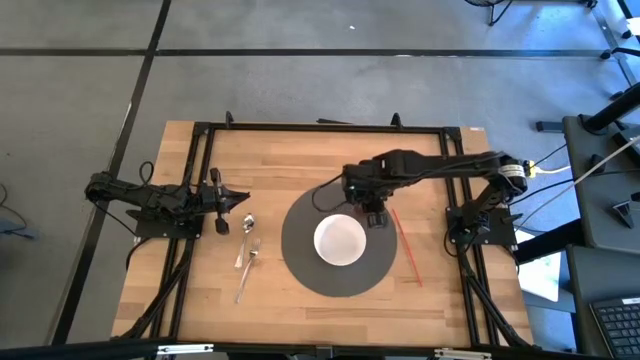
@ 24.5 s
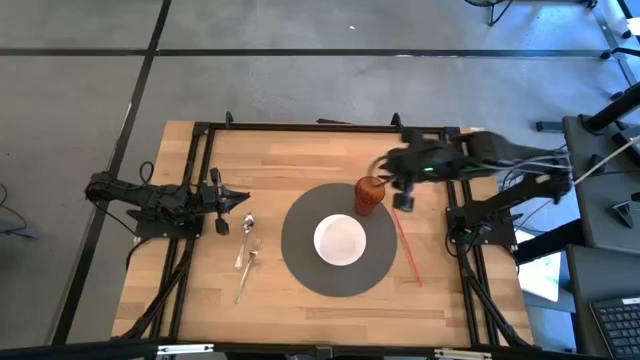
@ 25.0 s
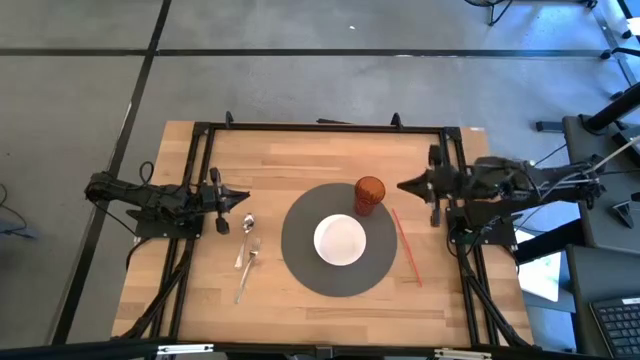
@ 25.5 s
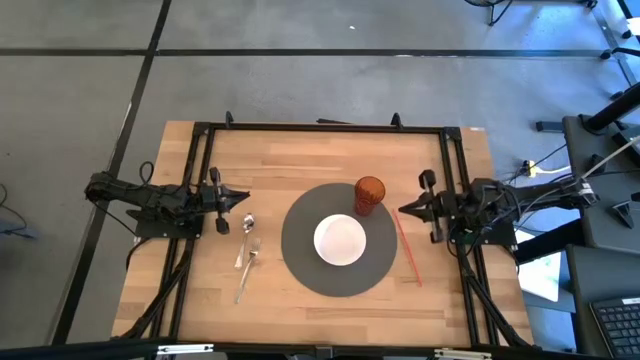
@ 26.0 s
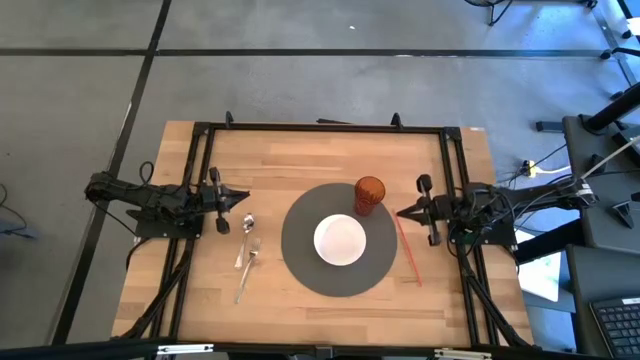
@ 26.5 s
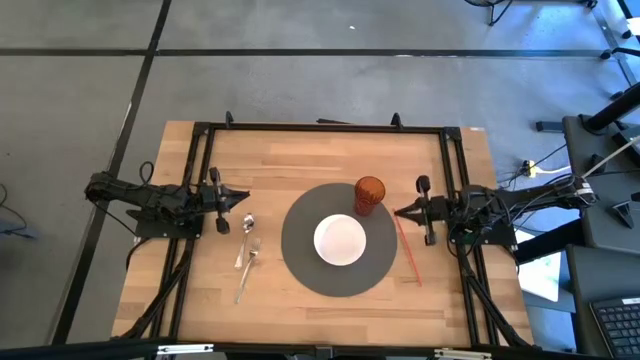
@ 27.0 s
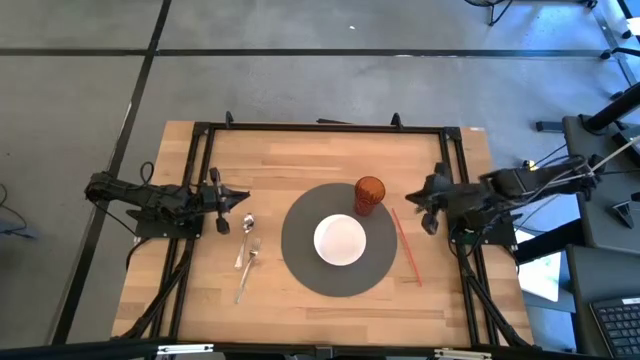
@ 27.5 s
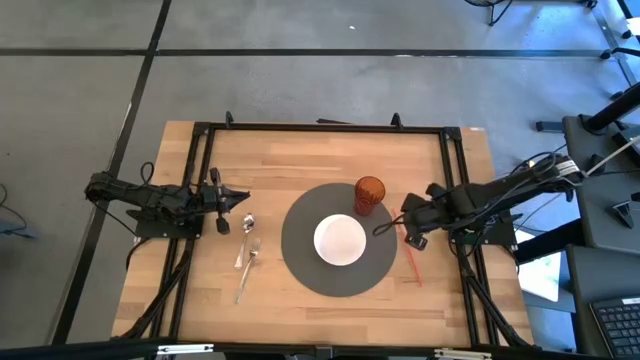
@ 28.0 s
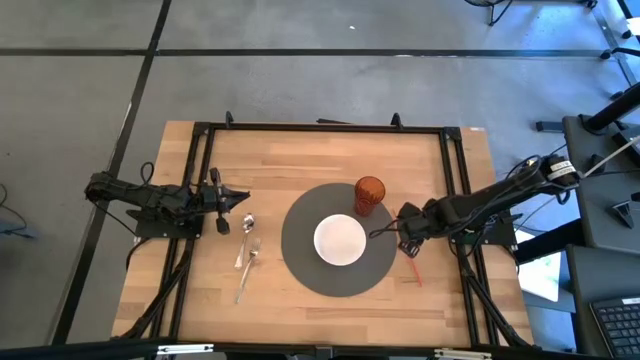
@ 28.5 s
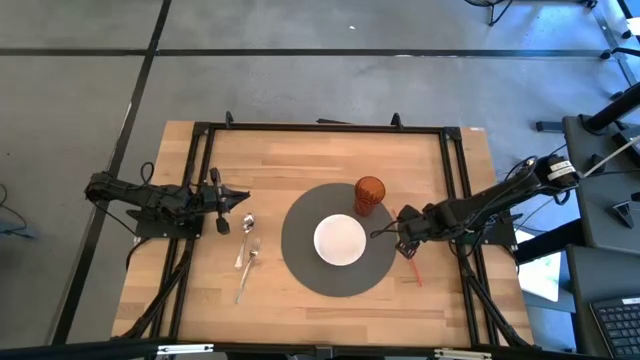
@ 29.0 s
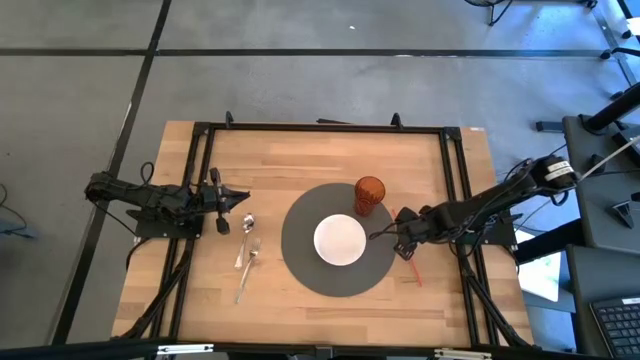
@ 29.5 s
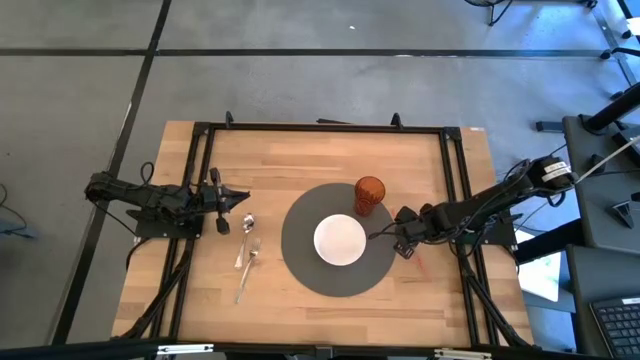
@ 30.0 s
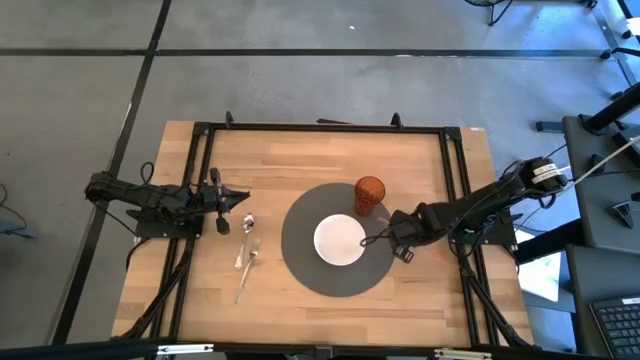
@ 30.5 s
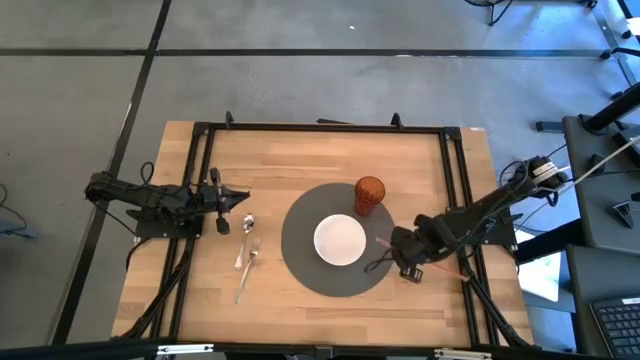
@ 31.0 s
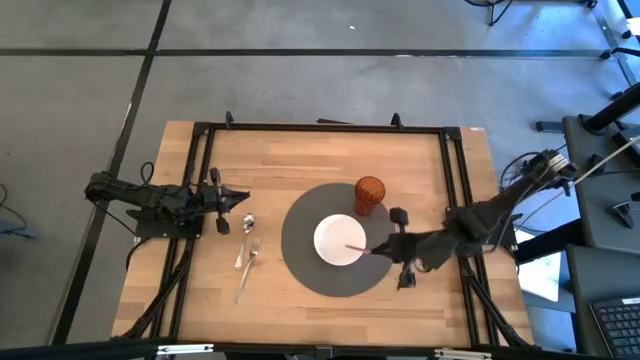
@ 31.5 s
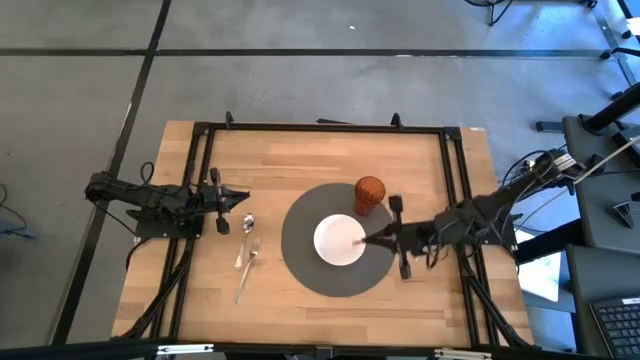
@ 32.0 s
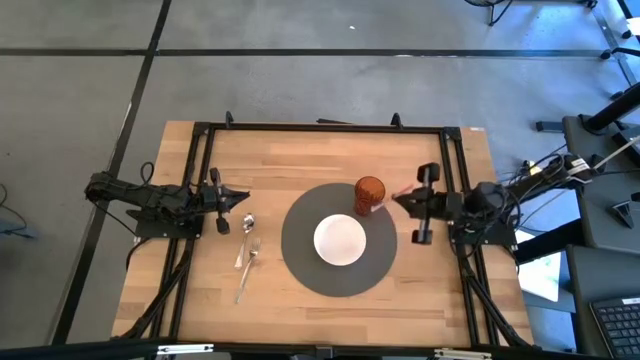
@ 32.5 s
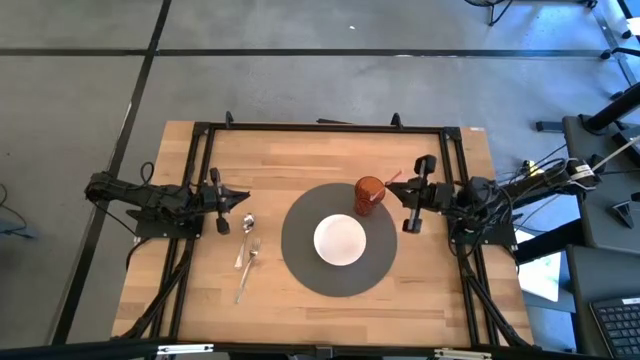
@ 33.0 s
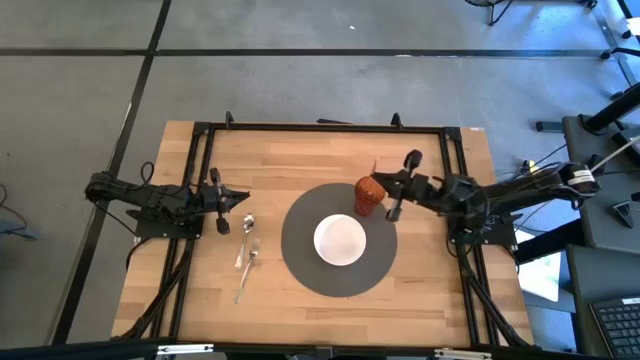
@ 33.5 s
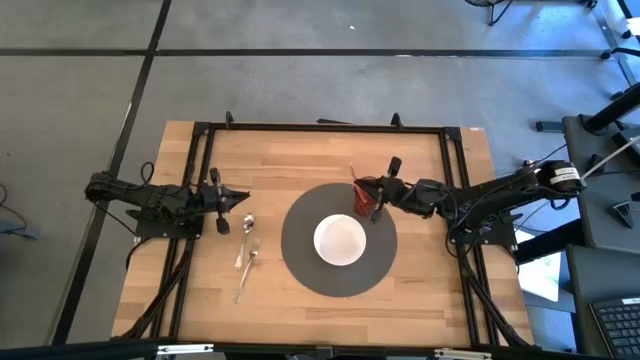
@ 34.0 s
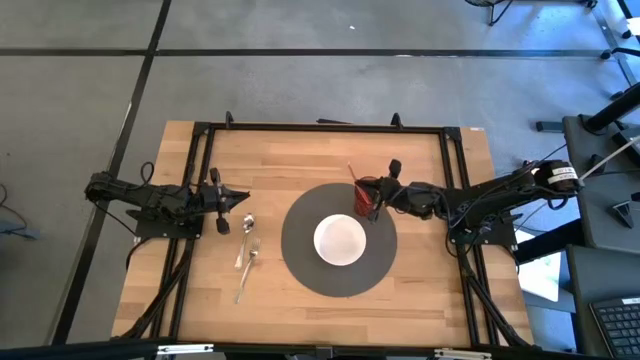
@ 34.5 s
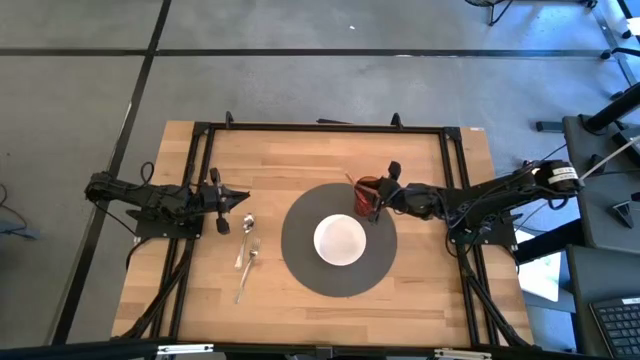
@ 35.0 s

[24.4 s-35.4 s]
Task: Pick & Place Utensil
Put the orange straw into the orange cup

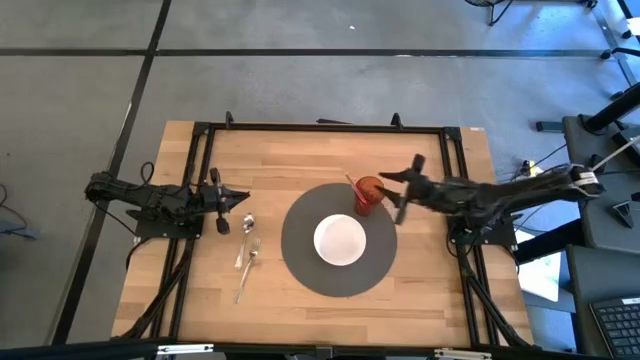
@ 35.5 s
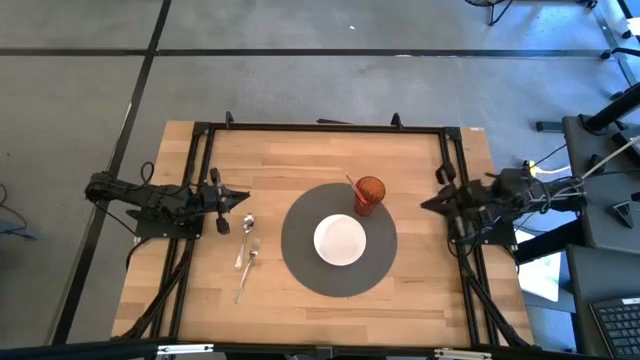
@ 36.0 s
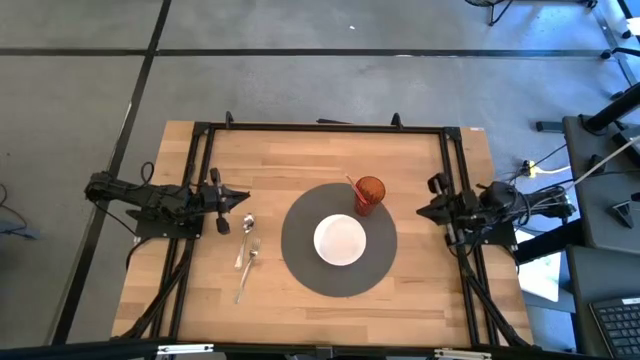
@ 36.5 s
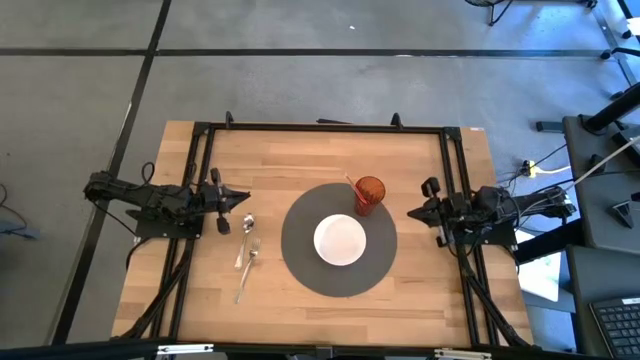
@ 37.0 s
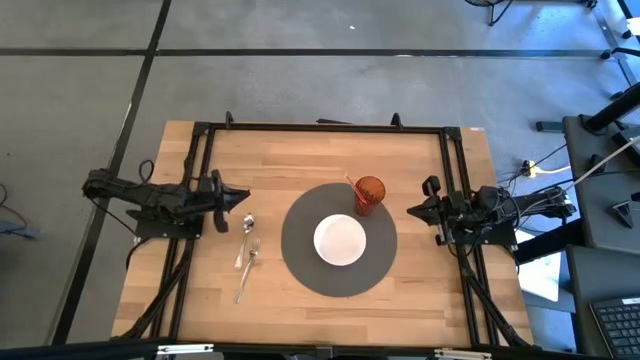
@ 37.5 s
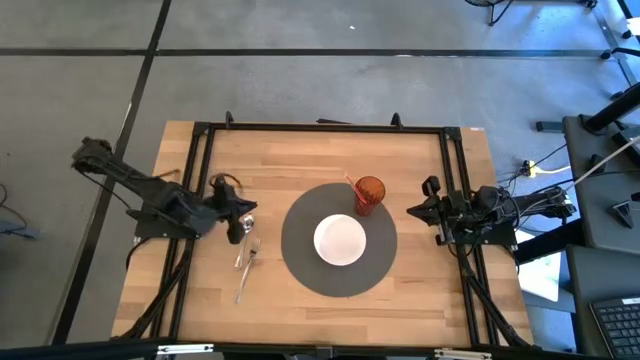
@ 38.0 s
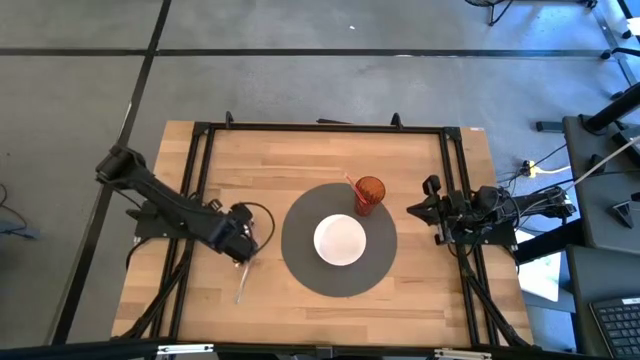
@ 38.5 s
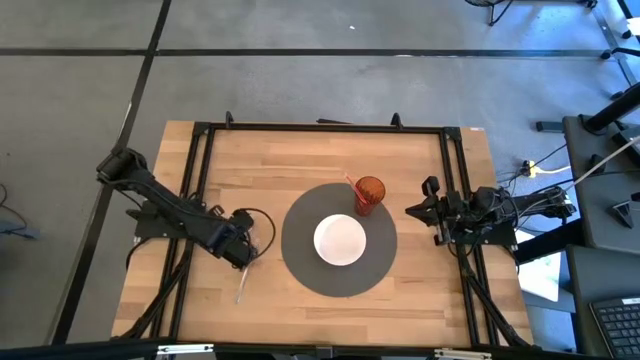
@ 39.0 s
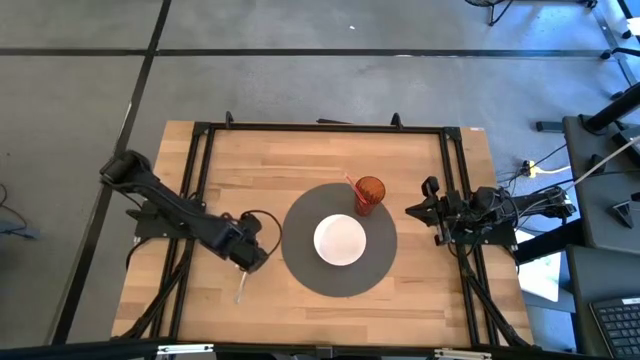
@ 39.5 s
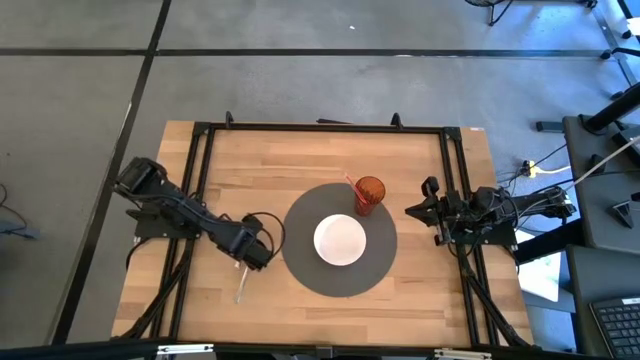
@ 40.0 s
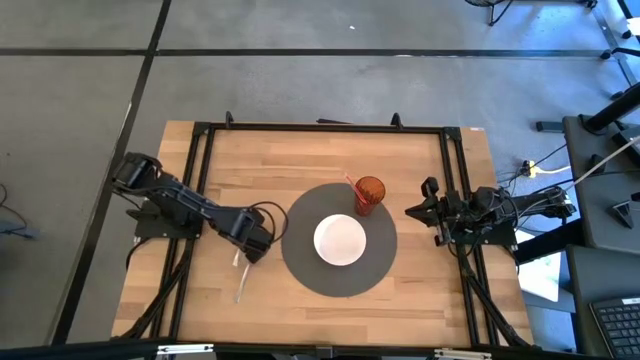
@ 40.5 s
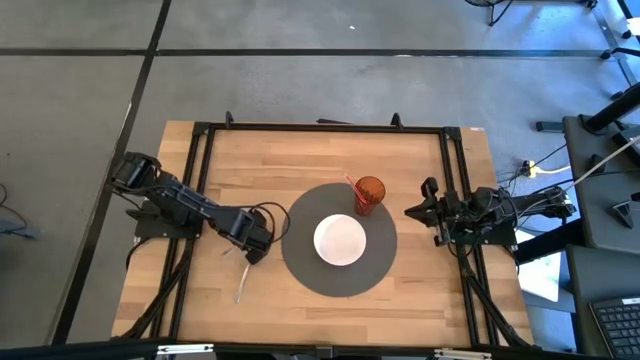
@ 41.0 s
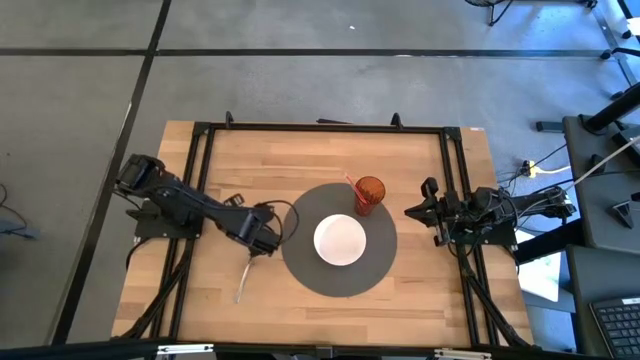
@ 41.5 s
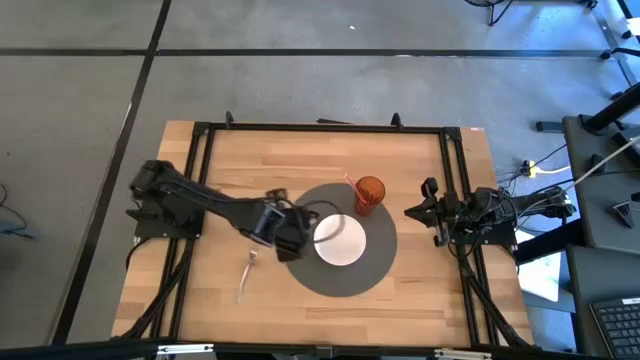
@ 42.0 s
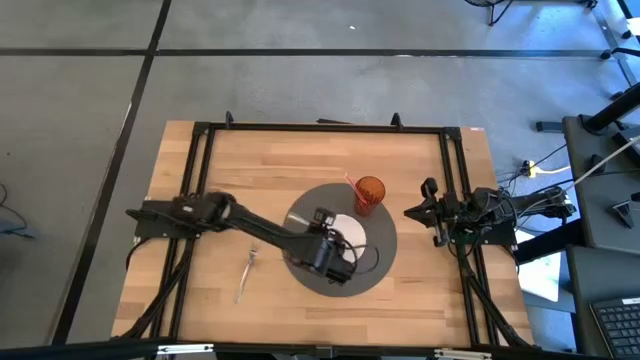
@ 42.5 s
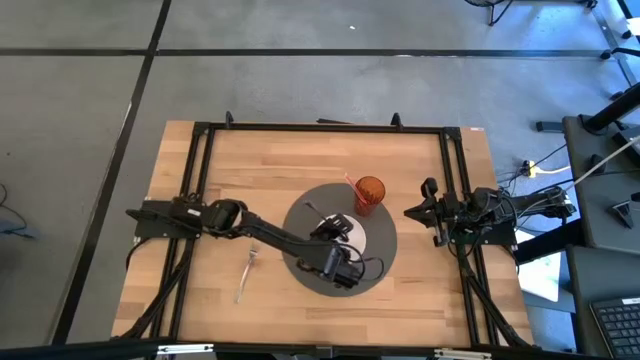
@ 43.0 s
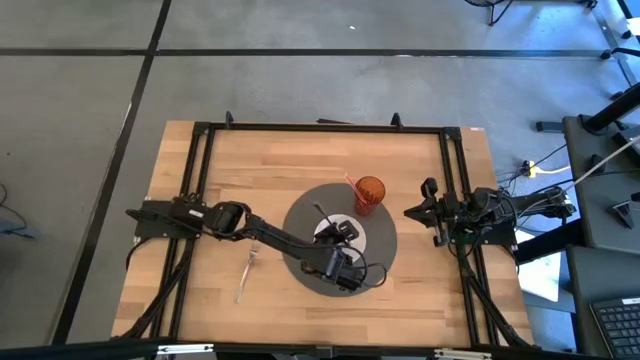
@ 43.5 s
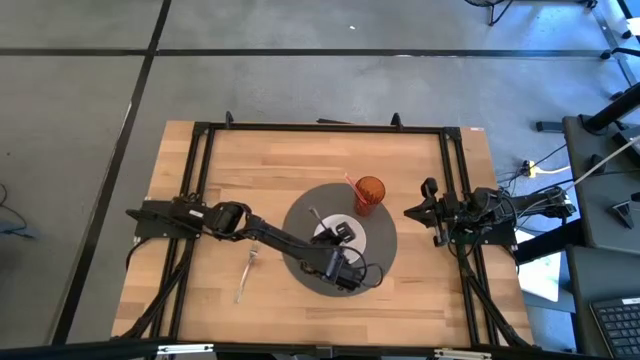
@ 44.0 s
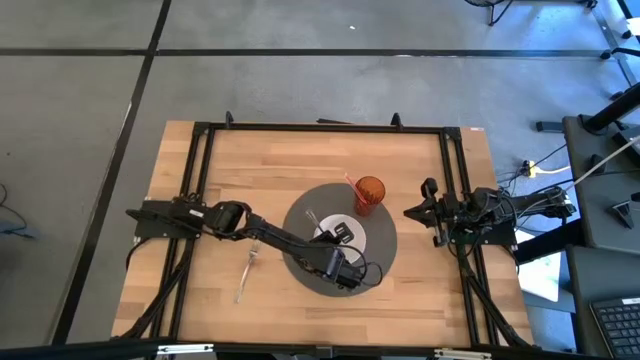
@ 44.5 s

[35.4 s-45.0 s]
Put the silver spoon into the white bowl

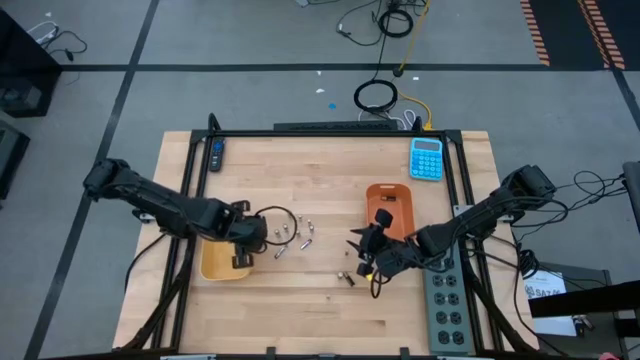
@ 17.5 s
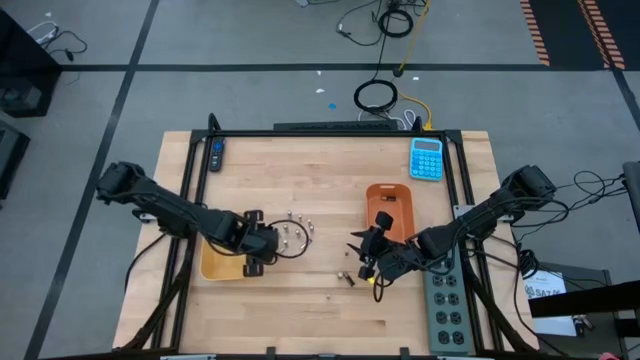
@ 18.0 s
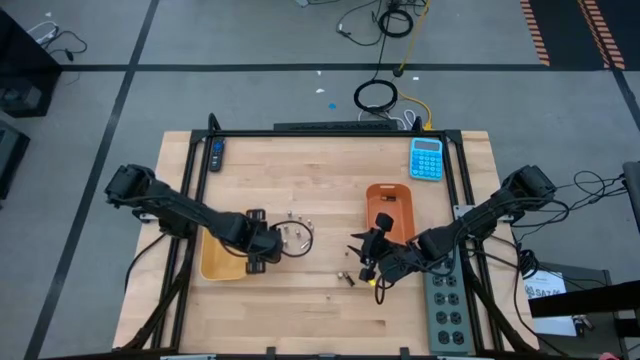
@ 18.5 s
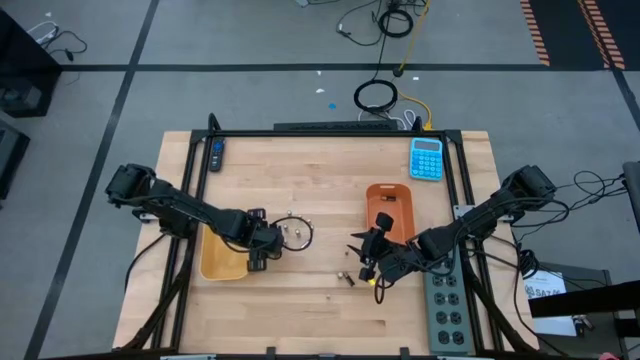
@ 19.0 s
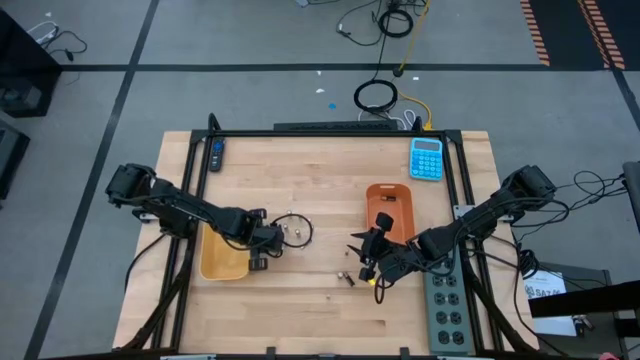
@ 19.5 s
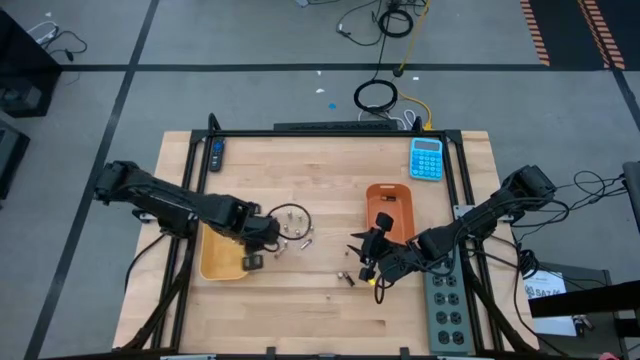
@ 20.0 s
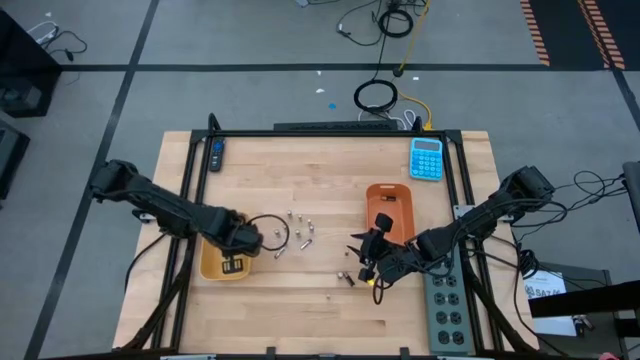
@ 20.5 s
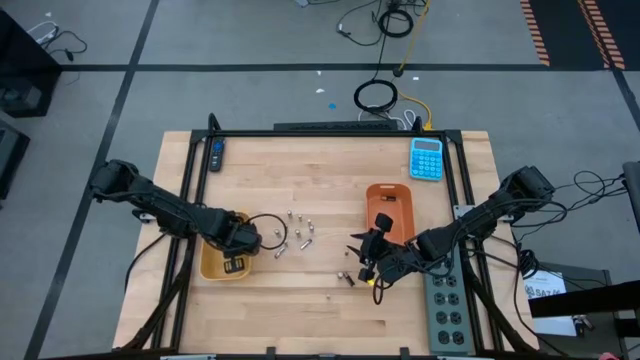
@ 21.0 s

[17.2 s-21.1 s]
Task: Sort batteries
Put the silver battery into the yellow bin
